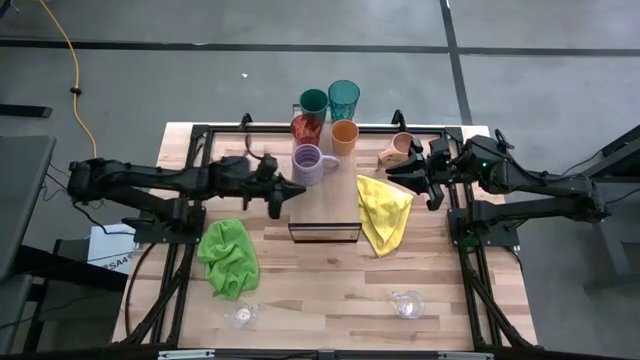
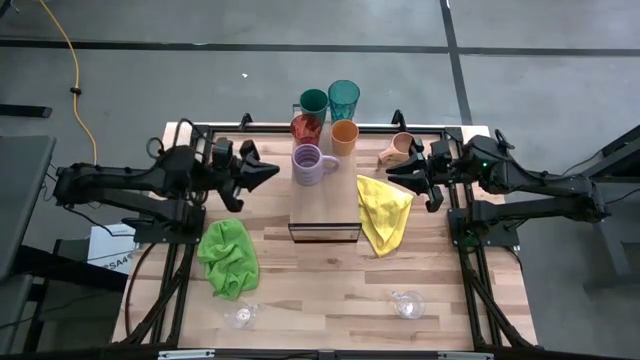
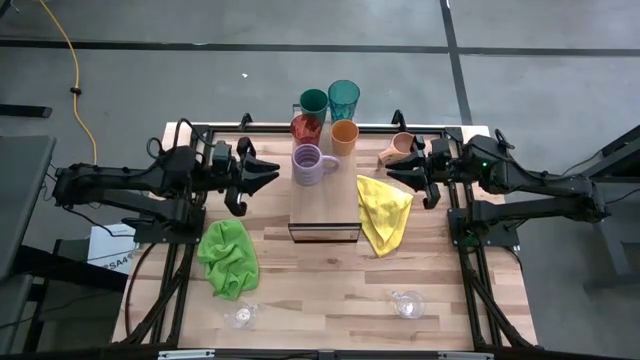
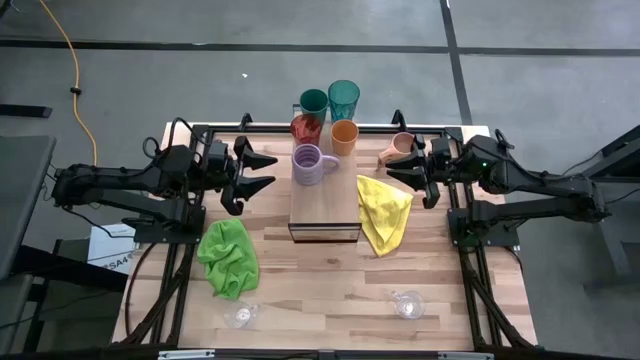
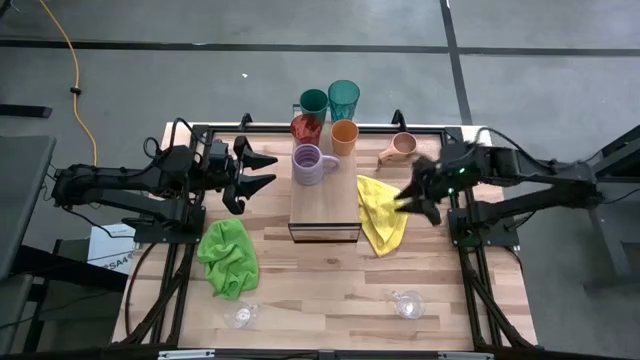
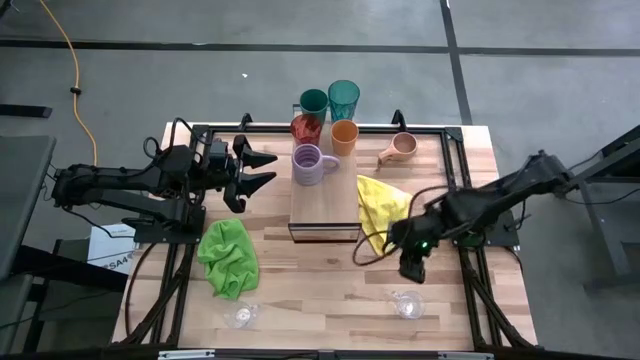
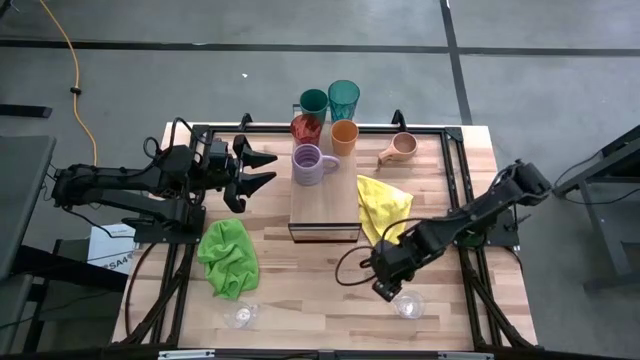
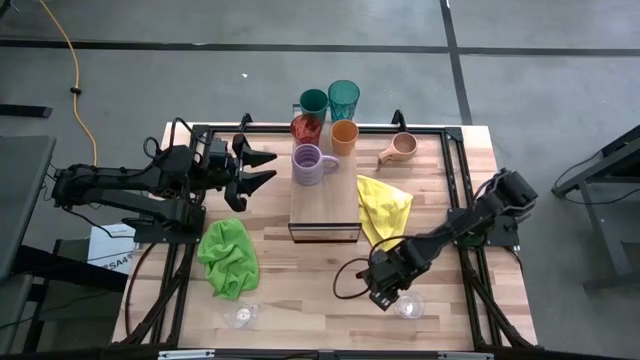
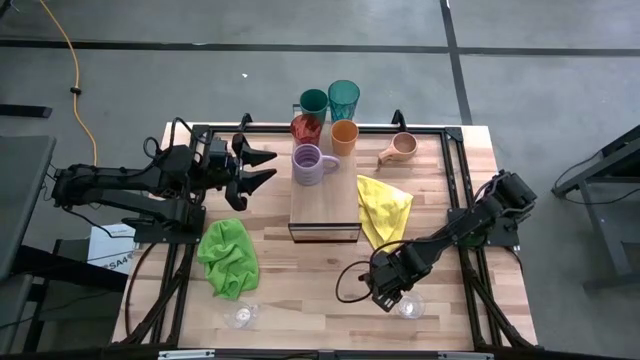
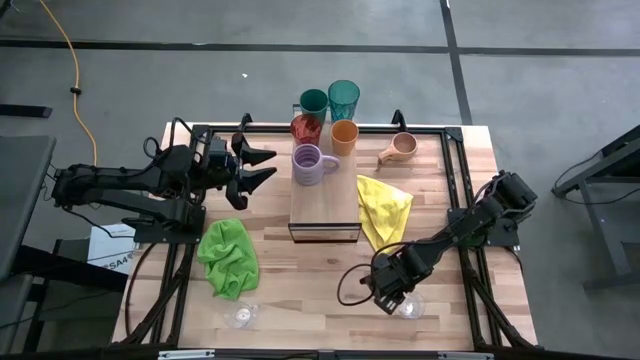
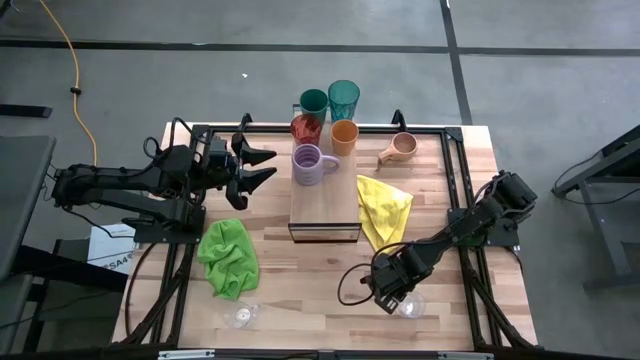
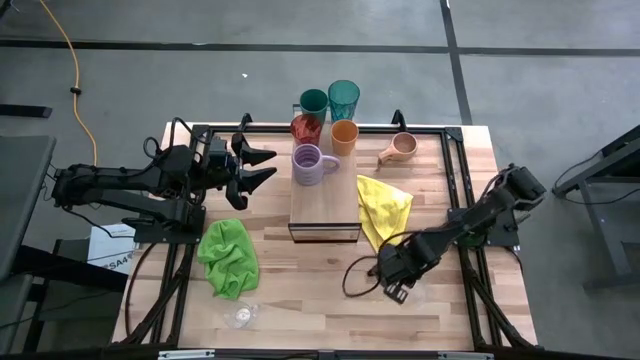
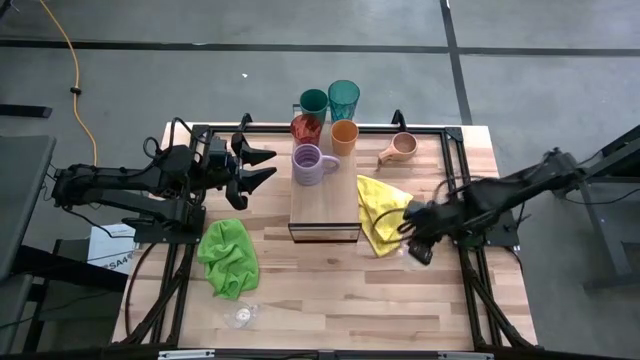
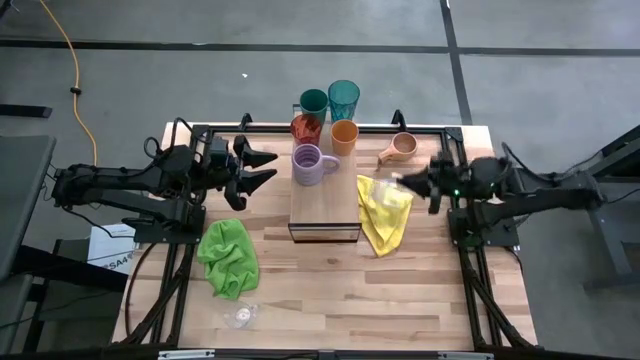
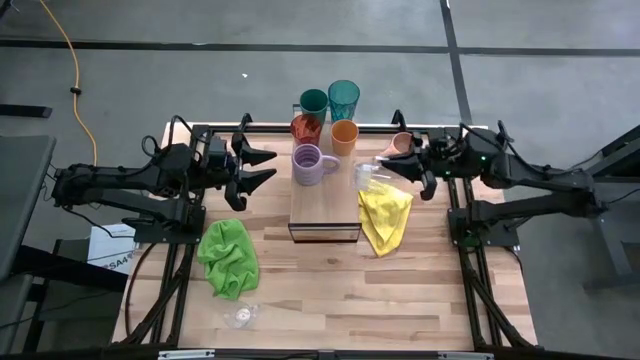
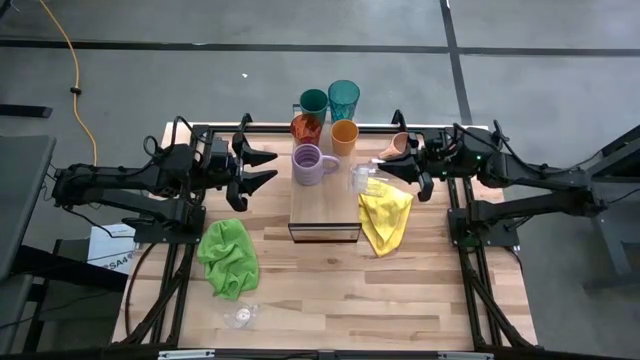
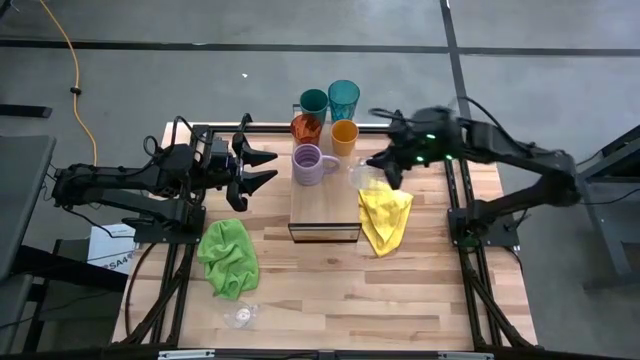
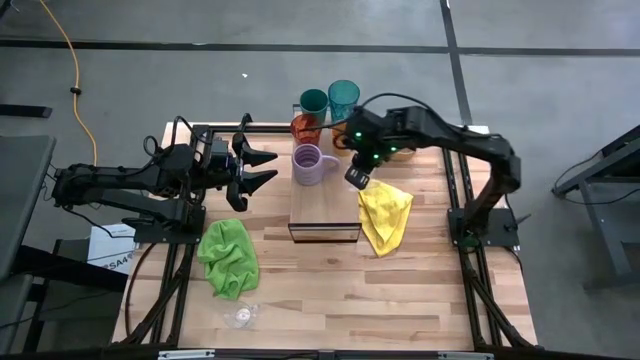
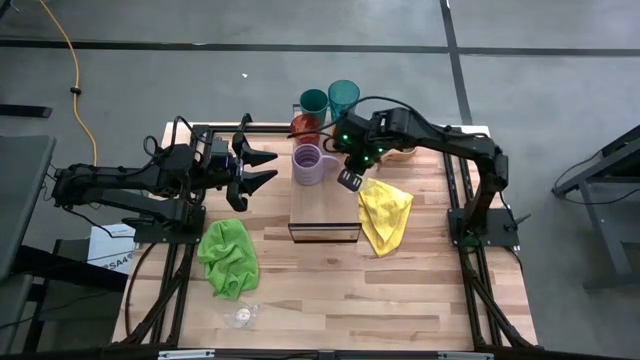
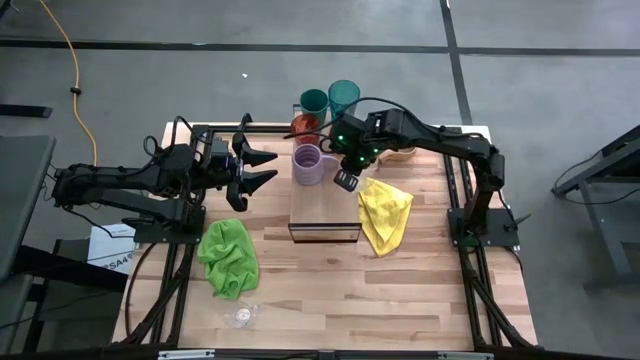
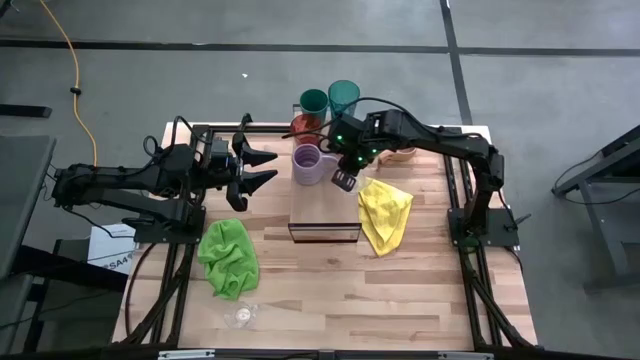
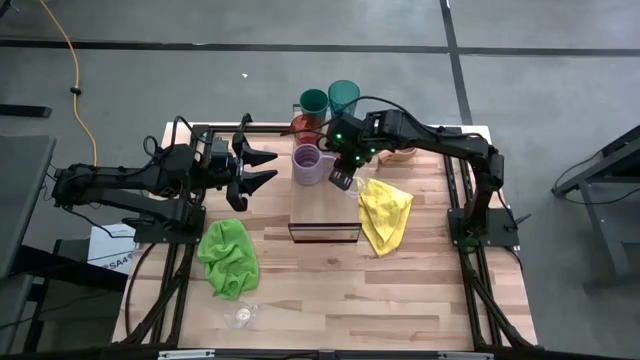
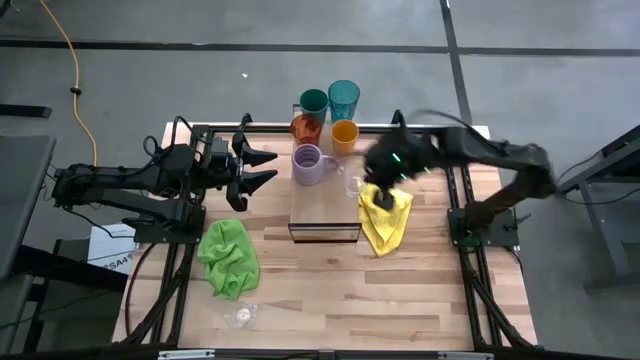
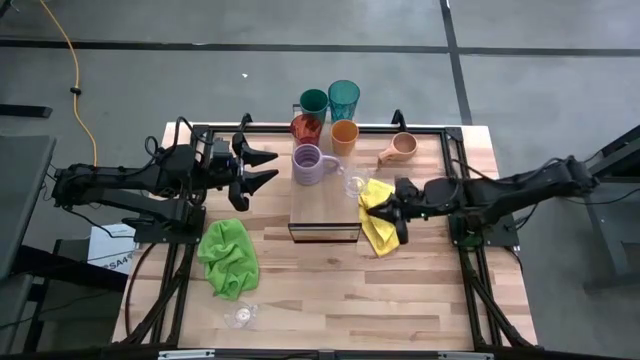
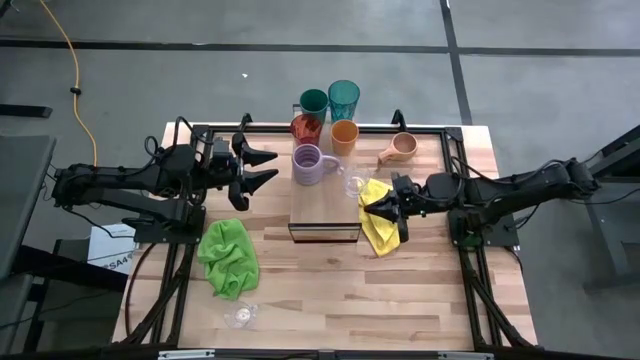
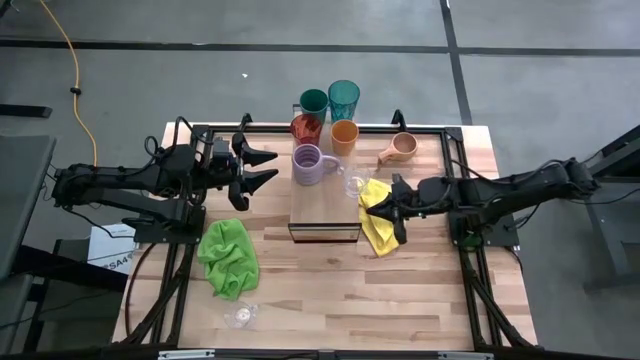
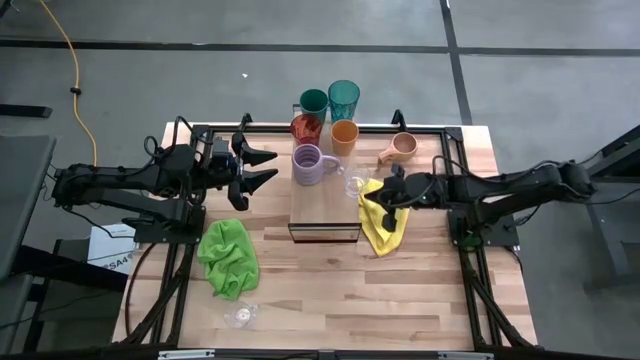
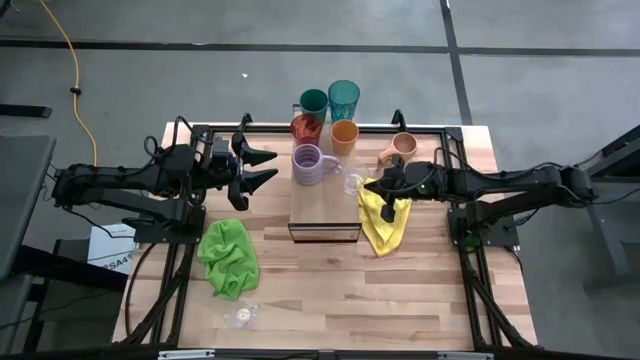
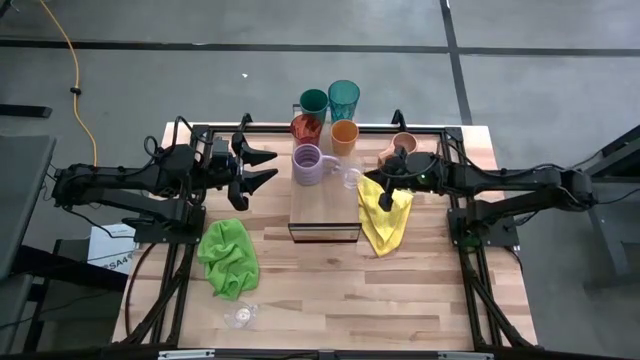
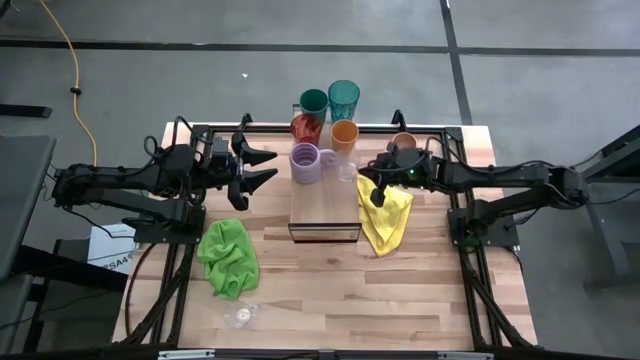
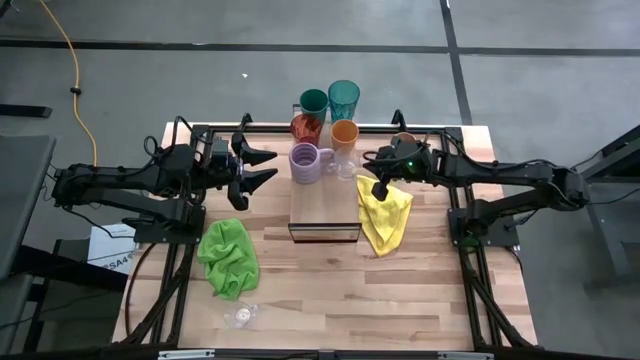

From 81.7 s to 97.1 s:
Task: Stack small to large cups/mugs on shelf
Put the right transparent cup on the shelf

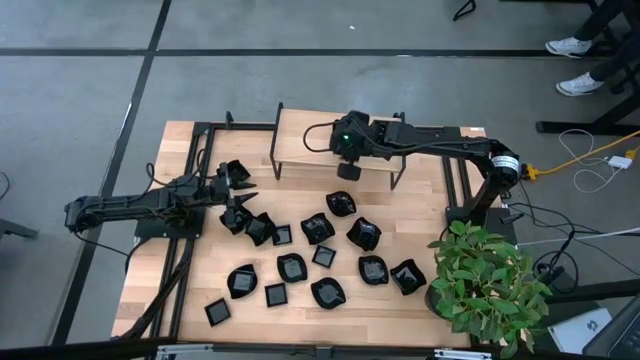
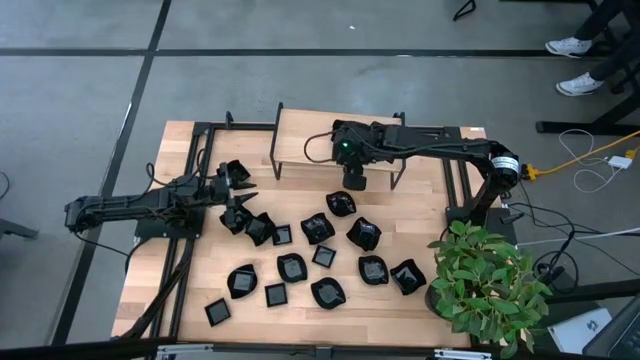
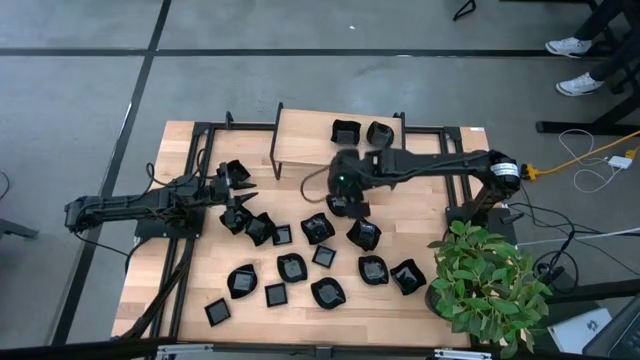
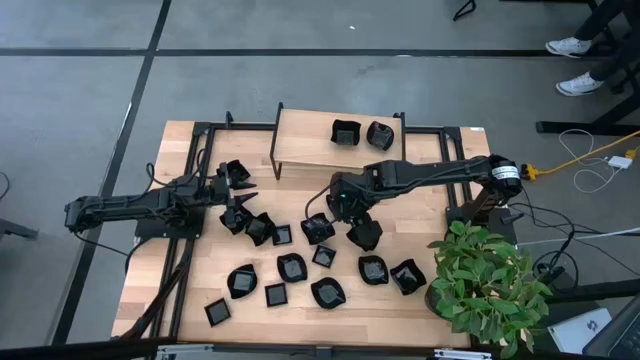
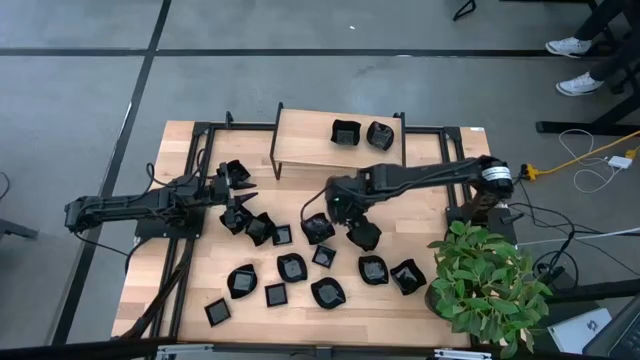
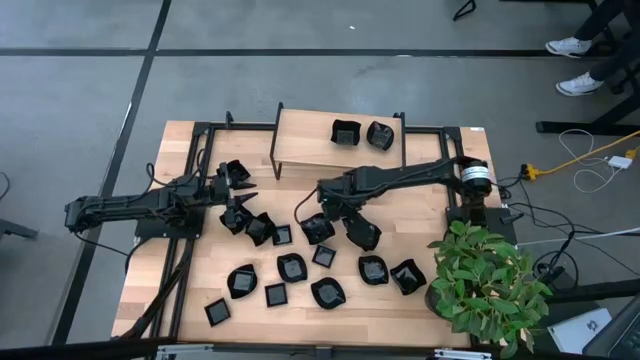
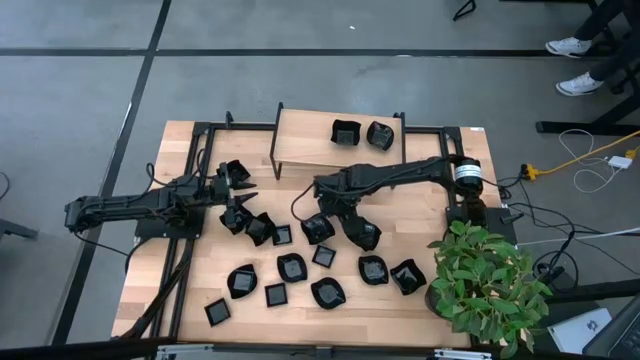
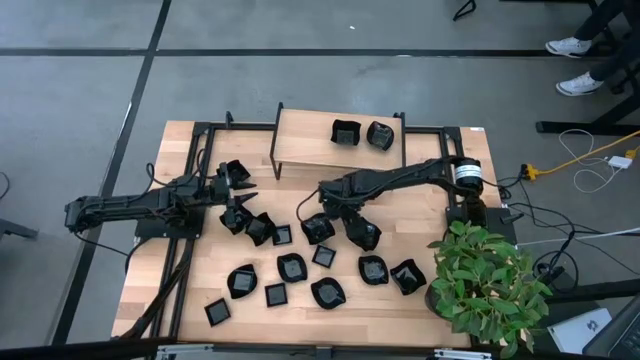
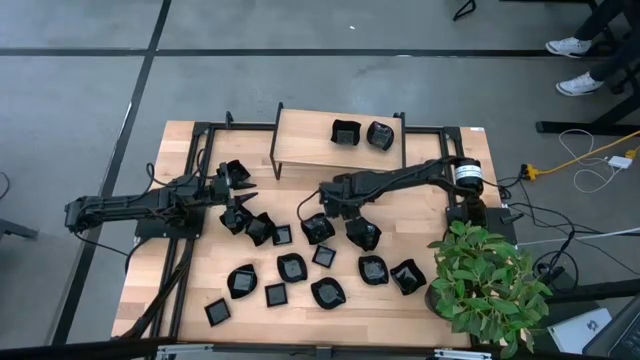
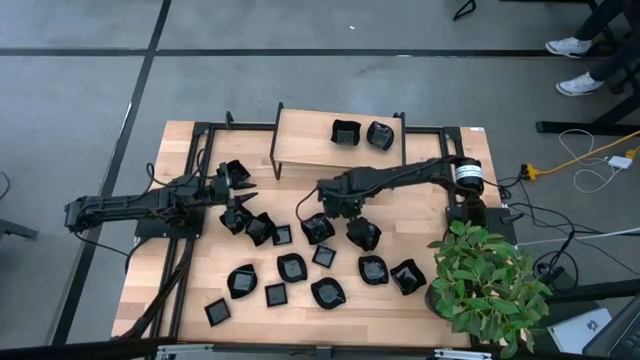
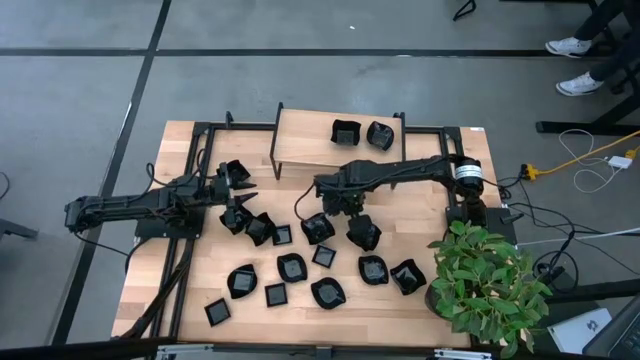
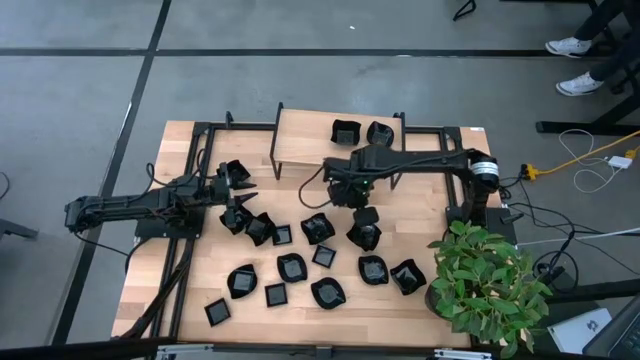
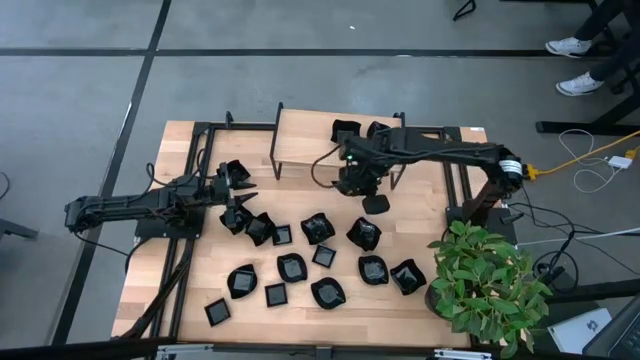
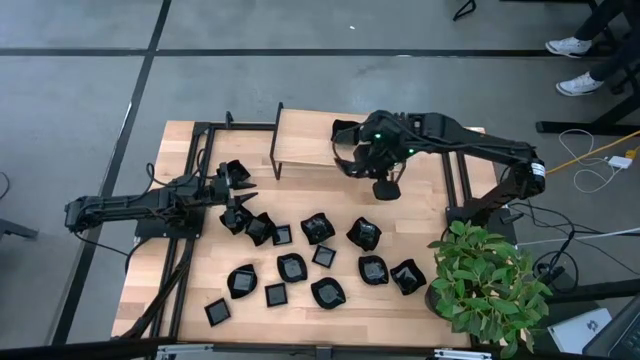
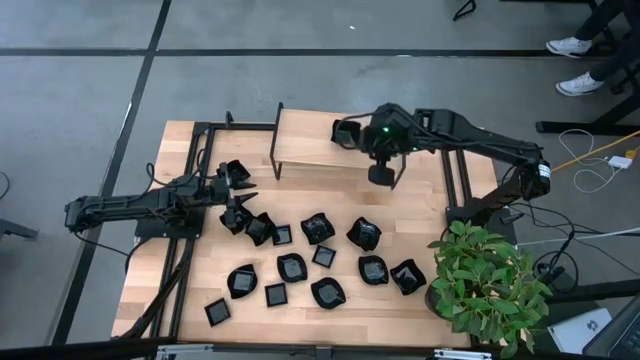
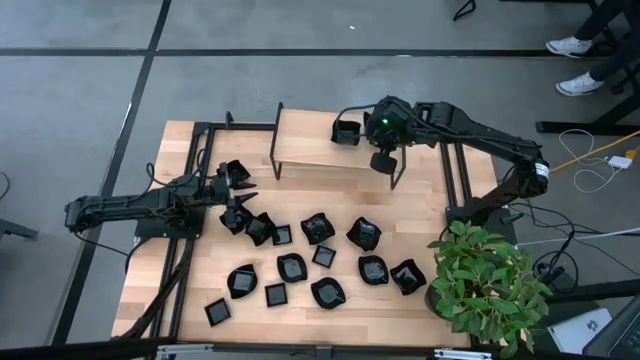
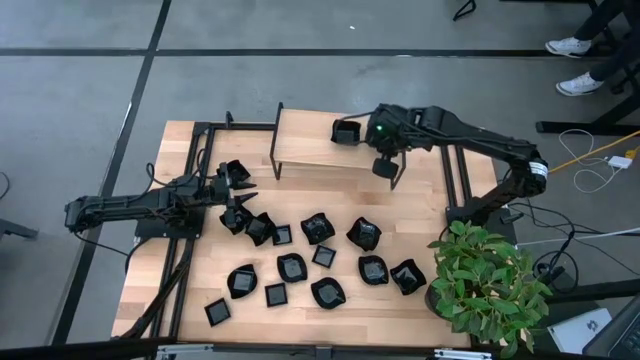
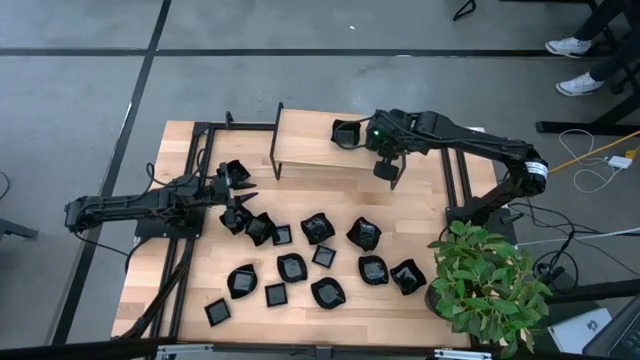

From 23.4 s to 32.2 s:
Task: Pick & Place Mini shaped plates
Stack the leaf-shaped plate on top of the leaf-shaped plate on the shelf
